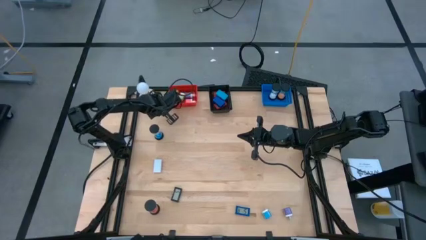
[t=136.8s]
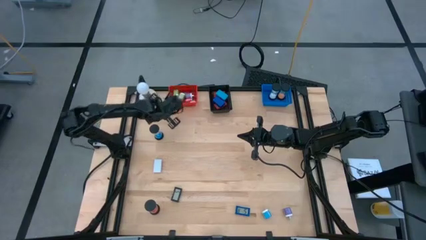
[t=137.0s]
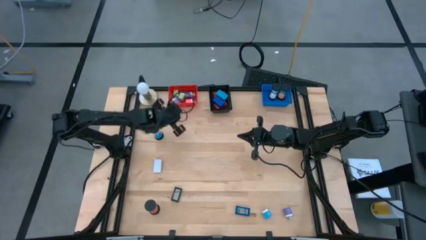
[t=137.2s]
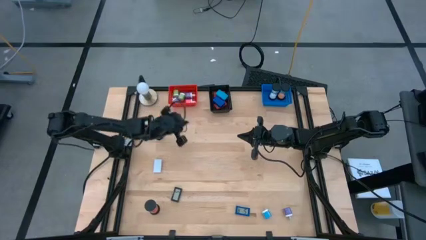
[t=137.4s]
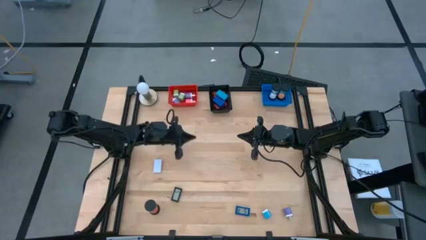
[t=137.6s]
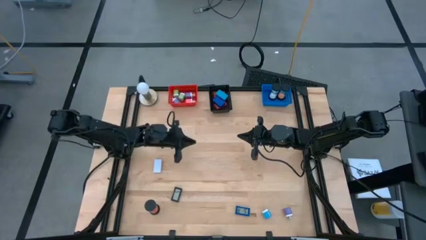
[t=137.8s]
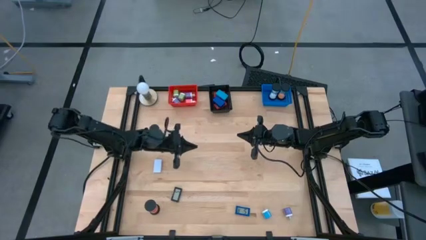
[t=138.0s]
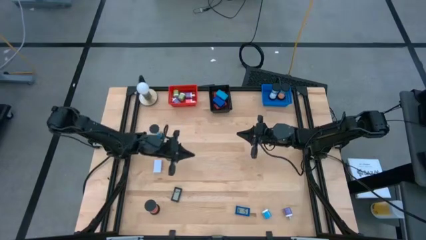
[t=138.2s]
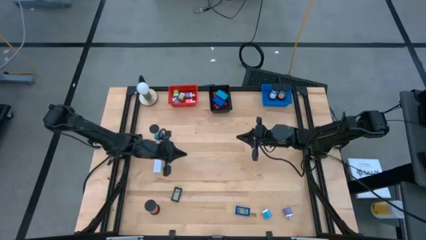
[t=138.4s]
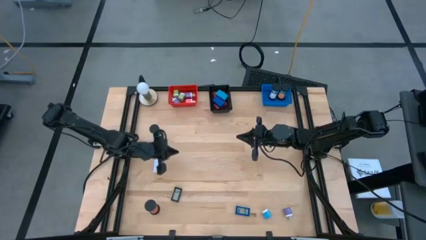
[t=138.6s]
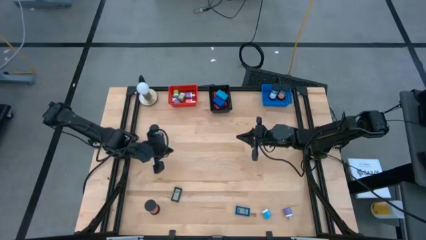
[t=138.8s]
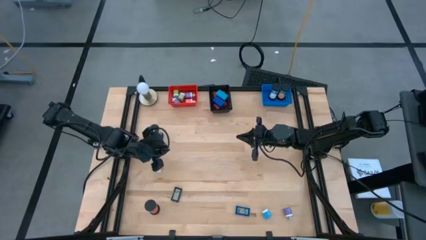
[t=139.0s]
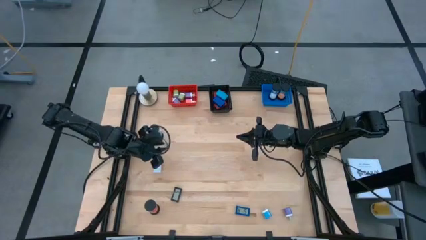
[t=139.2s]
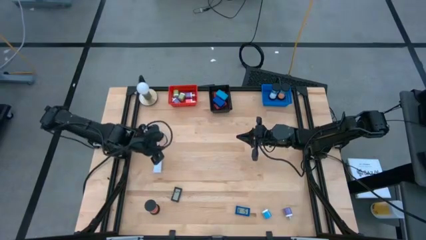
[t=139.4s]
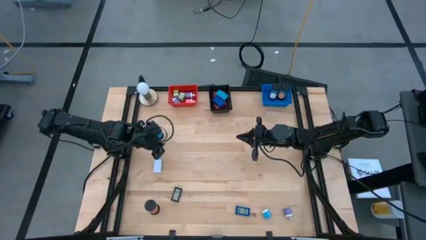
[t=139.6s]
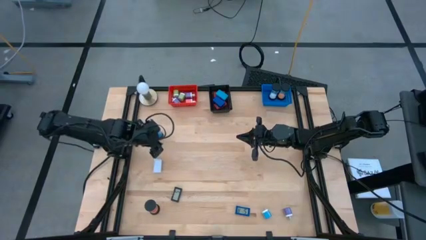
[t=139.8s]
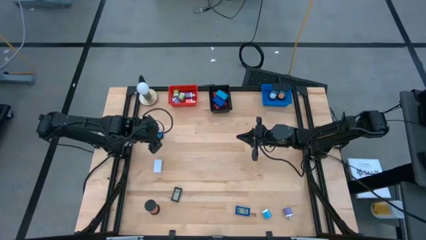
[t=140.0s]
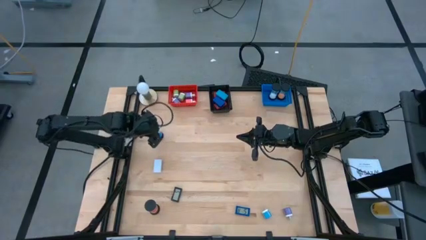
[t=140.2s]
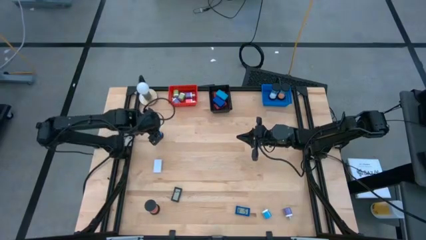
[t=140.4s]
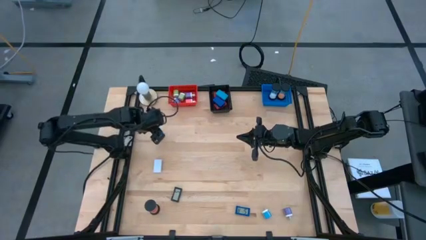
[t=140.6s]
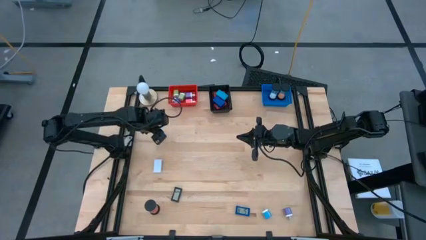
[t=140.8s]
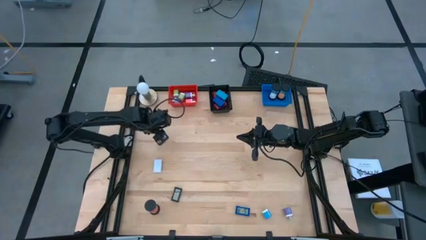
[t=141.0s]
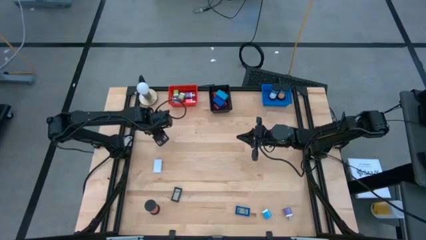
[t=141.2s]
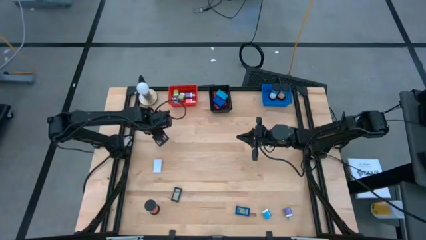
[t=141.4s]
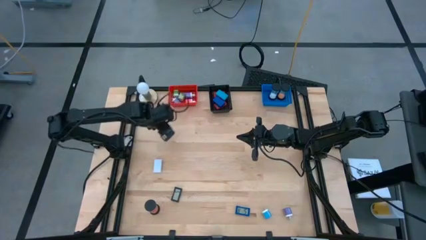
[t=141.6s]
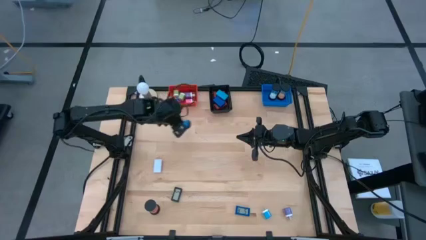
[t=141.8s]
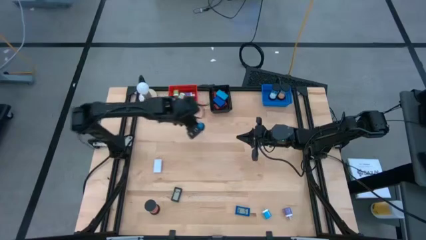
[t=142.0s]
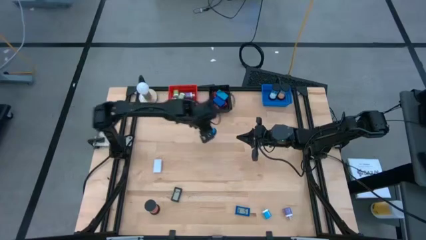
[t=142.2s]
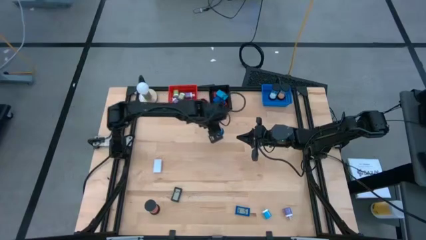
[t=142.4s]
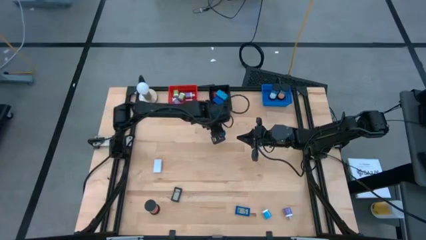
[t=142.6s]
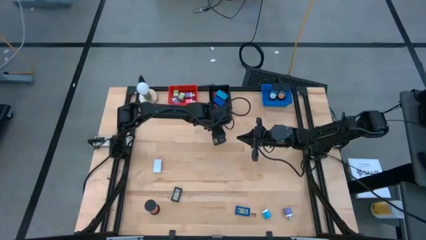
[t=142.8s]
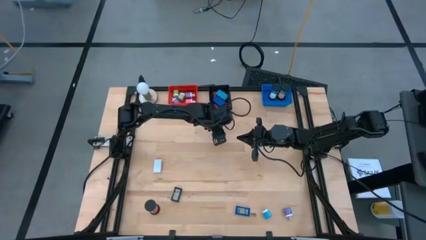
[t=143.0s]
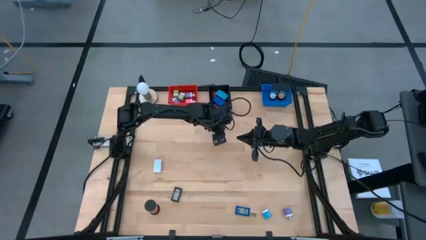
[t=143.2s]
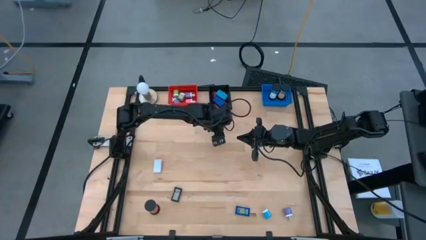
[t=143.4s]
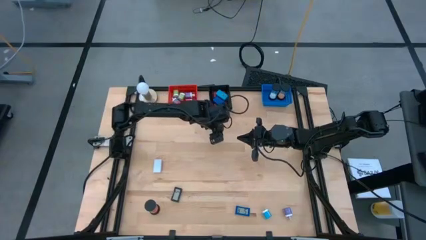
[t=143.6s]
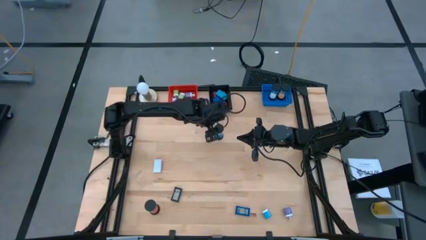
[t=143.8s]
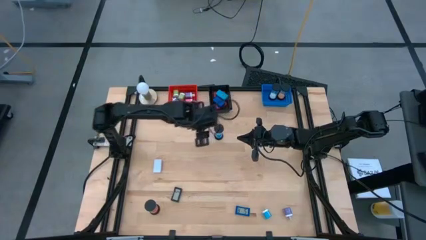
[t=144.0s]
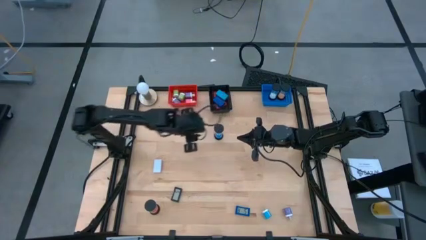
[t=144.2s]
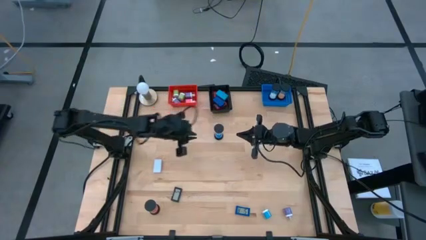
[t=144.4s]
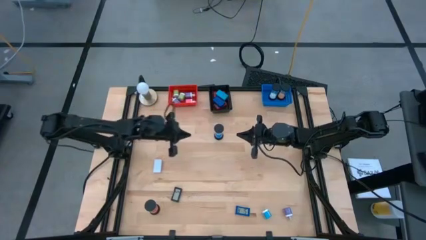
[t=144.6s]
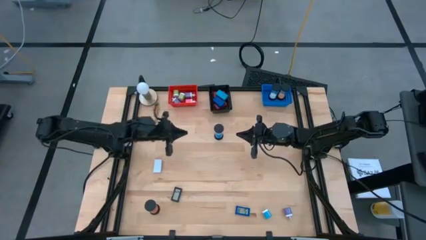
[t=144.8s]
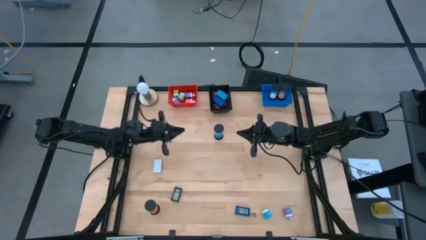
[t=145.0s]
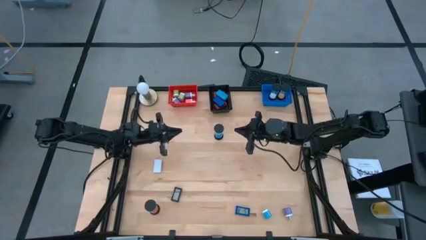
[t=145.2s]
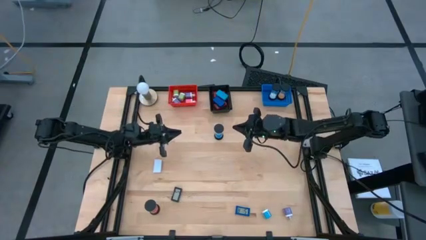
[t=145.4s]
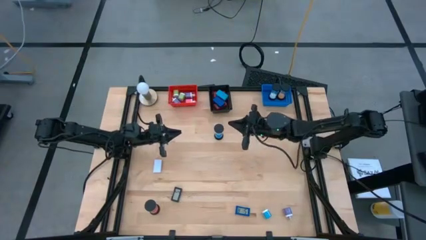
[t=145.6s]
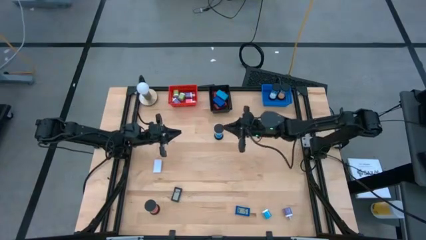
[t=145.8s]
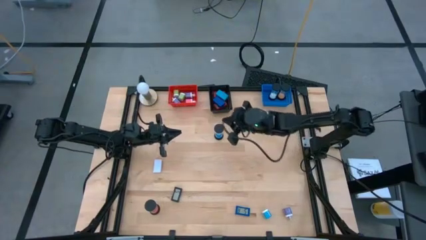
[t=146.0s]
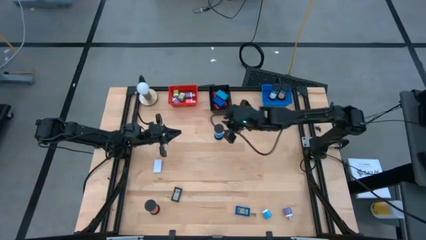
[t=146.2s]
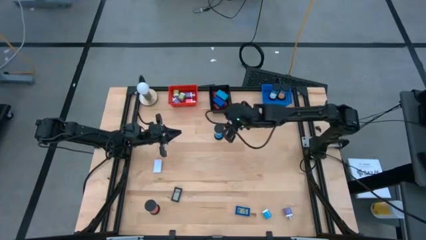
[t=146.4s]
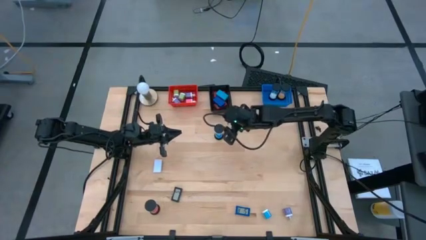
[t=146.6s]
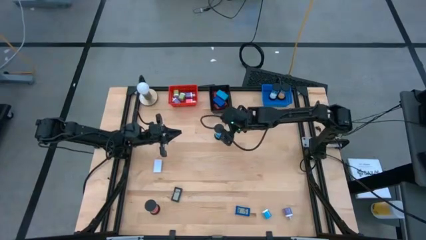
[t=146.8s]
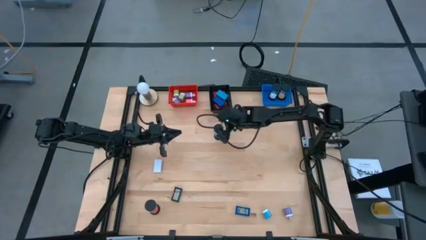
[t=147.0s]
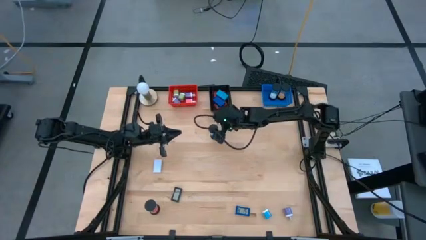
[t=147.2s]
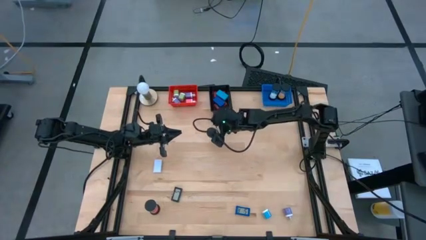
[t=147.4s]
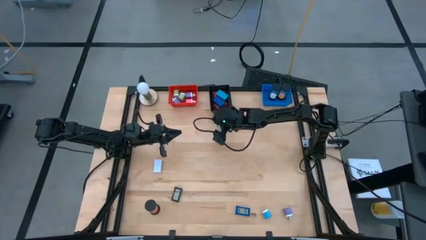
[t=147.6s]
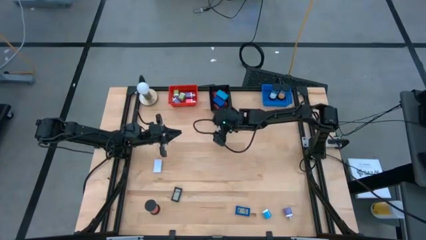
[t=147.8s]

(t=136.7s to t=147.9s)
Task: Pick & Place Office items
Put the blue hourglass into the blue bin

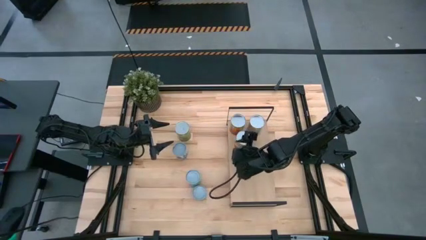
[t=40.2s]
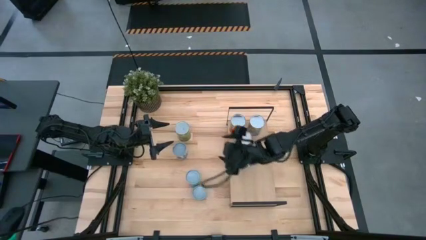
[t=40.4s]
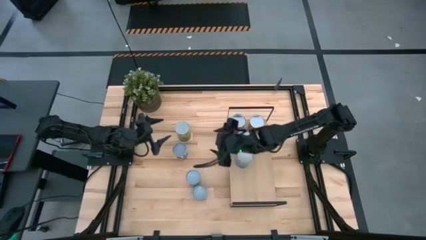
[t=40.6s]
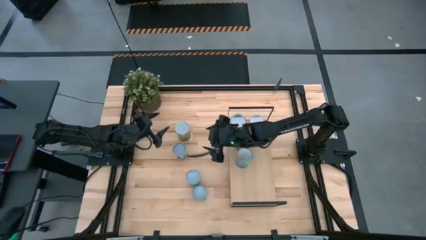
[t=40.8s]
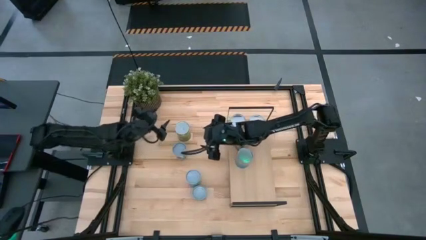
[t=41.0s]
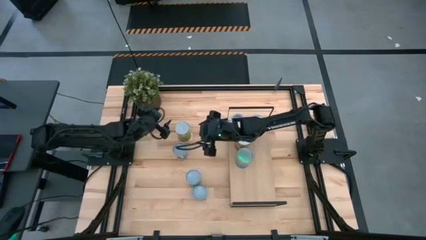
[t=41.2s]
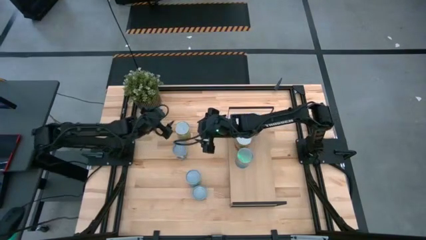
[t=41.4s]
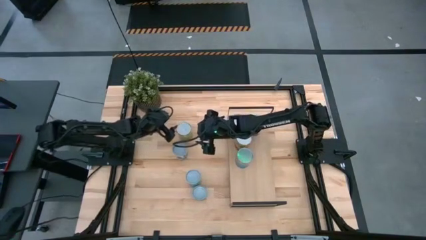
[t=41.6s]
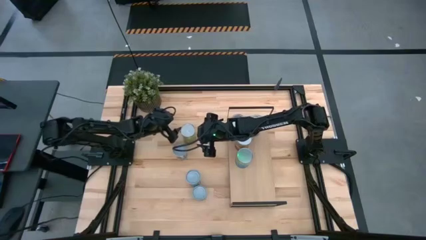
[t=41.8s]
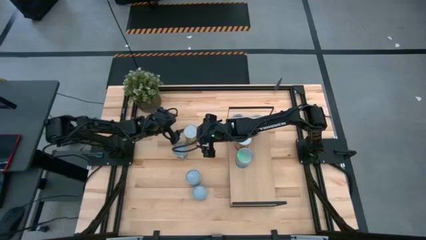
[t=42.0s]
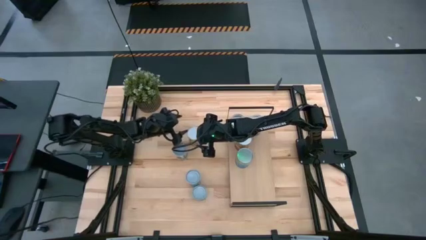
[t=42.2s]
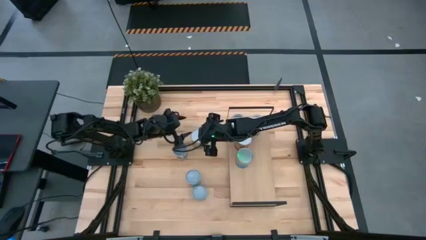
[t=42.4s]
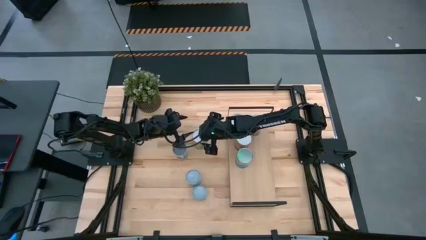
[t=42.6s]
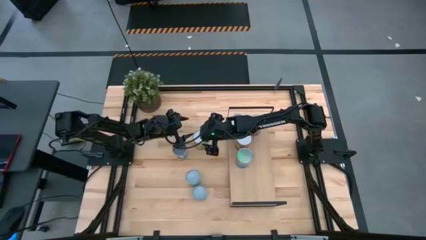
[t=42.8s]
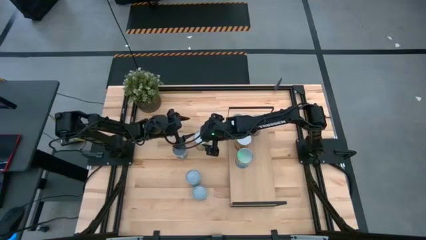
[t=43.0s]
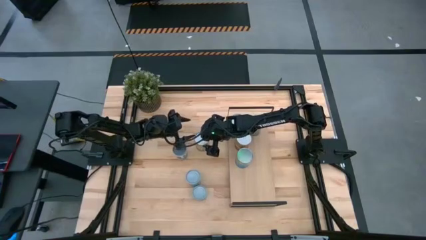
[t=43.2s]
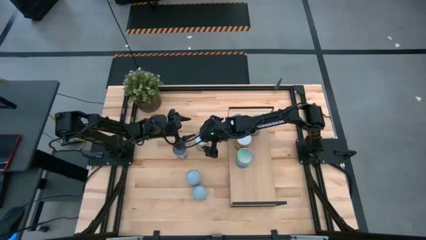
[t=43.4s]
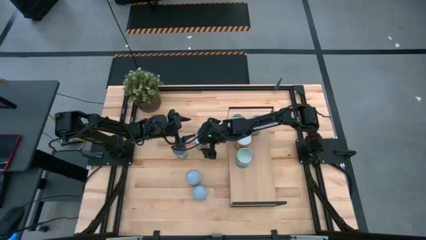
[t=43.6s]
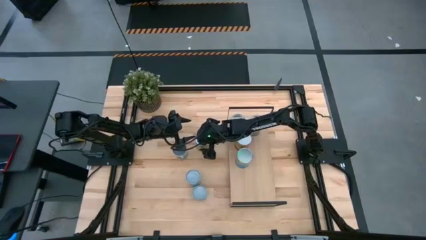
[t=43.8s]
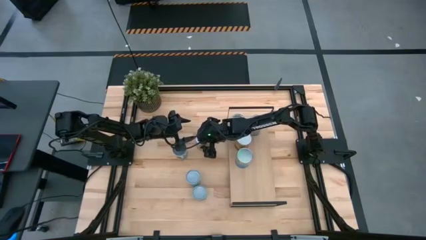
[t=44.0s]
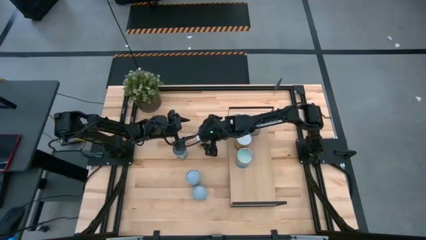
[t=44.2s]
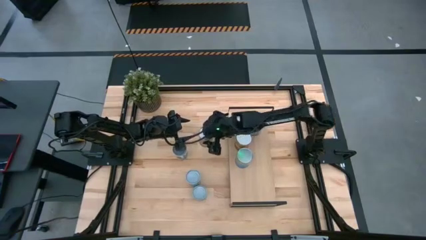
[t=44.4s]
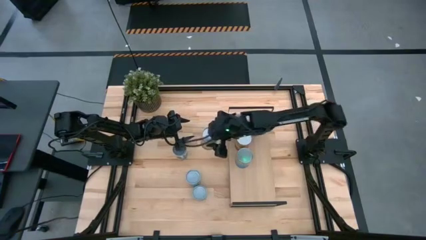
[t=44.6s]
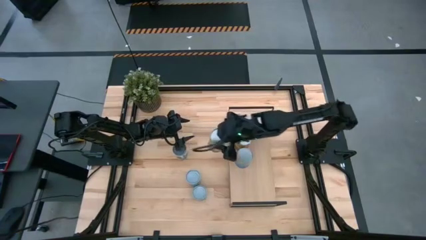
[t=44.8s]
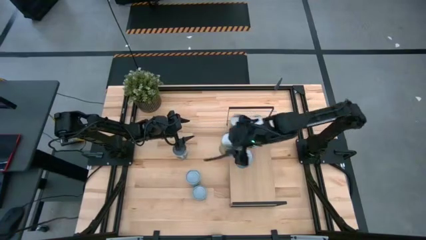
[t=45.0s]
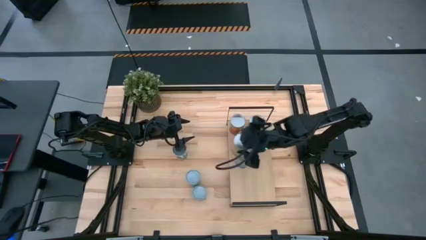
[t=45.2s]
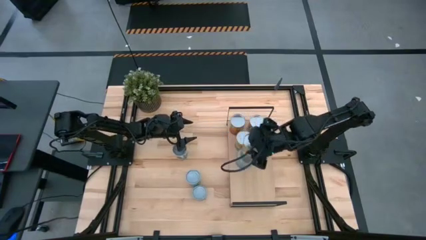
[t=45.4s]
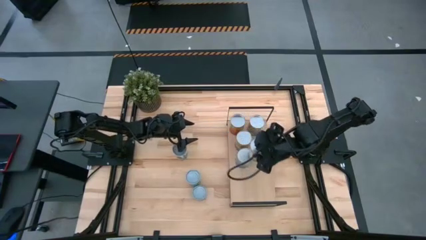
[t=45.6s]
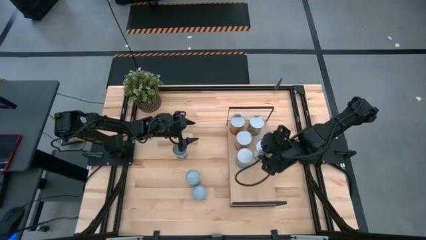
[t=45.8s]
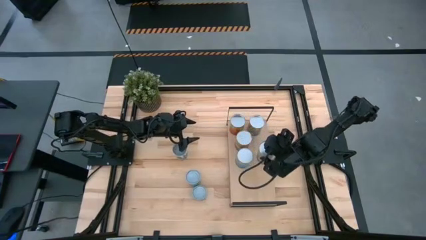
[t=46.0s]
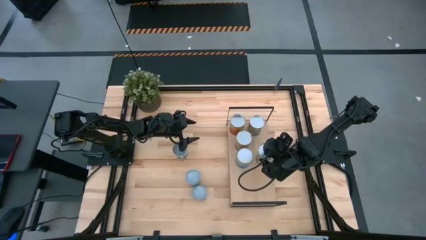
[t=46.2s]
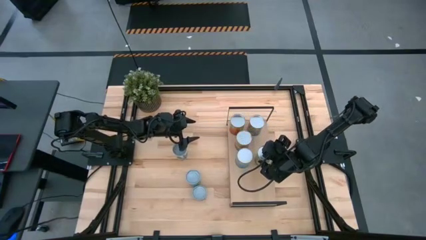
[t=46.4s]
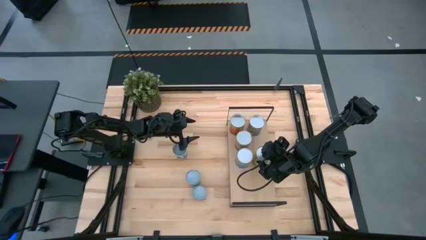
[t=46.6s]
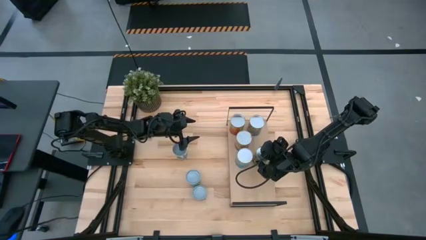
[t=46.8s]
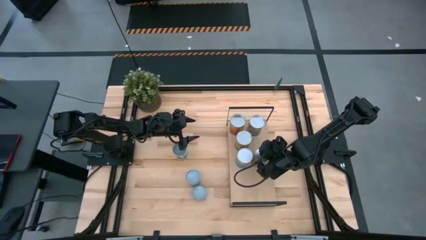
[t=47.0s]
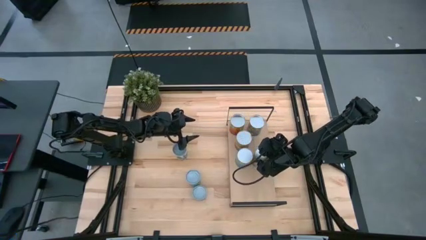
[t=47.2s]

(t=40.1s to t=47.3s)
Task: Pick and place cans onto a shelf
Put the canned oranges on the shelf
